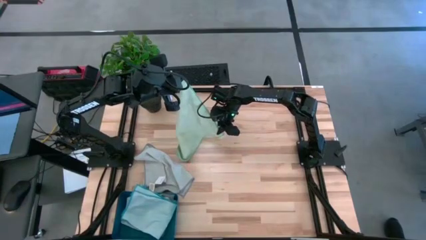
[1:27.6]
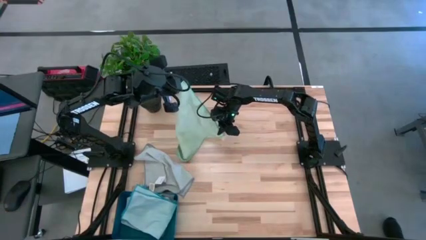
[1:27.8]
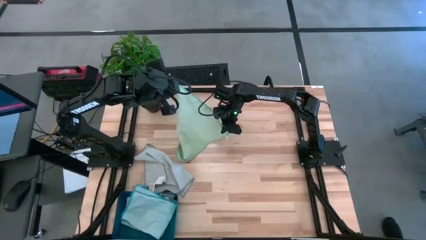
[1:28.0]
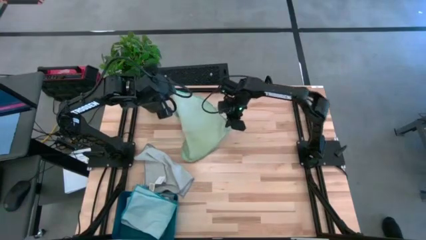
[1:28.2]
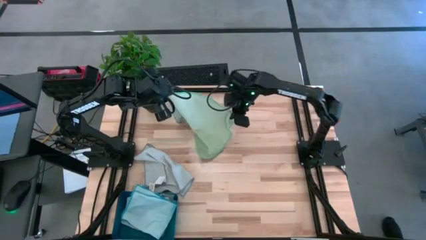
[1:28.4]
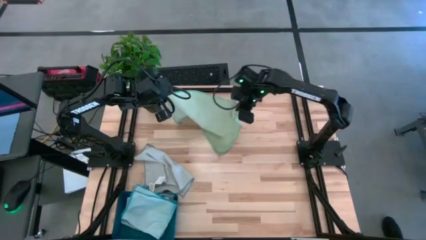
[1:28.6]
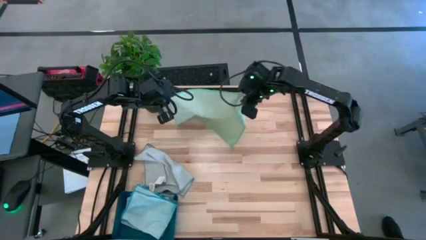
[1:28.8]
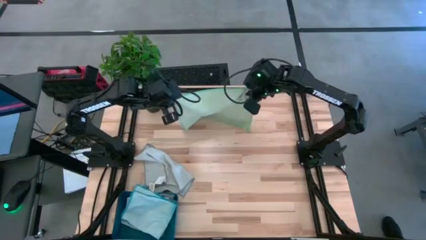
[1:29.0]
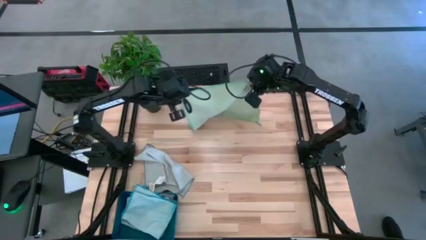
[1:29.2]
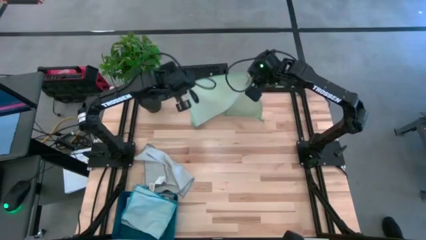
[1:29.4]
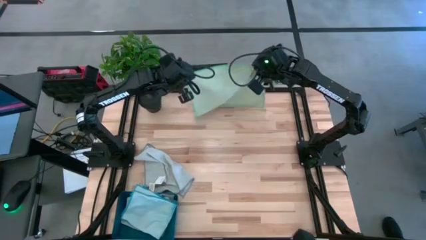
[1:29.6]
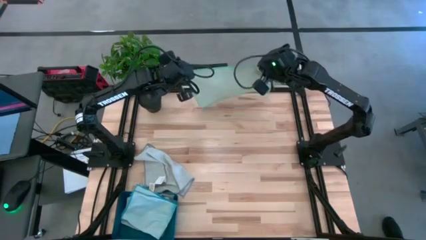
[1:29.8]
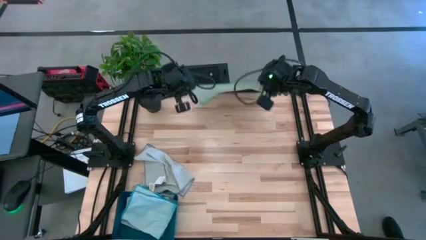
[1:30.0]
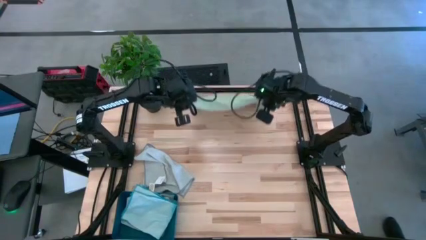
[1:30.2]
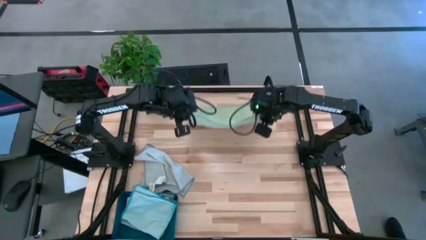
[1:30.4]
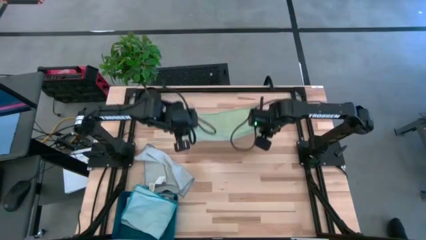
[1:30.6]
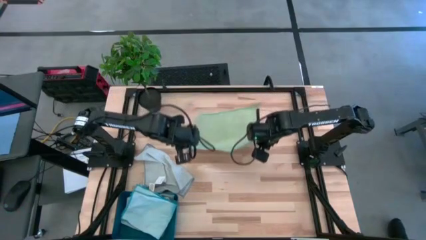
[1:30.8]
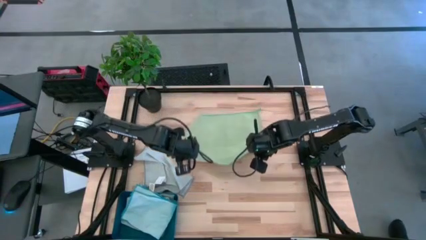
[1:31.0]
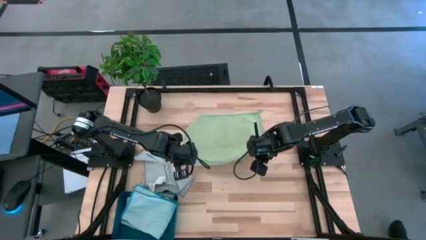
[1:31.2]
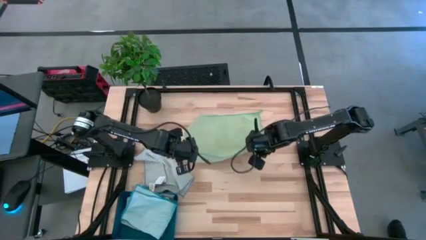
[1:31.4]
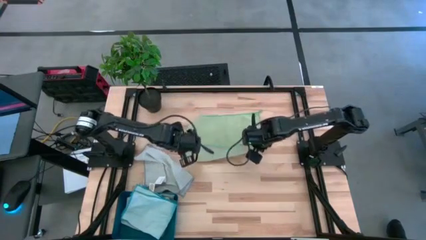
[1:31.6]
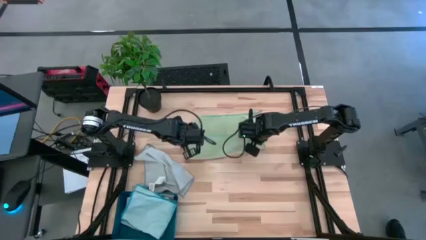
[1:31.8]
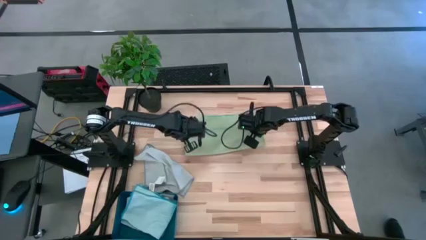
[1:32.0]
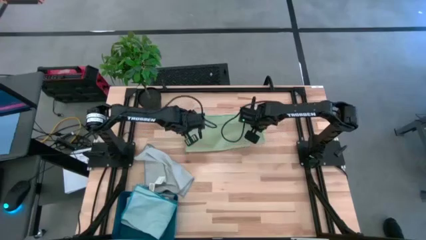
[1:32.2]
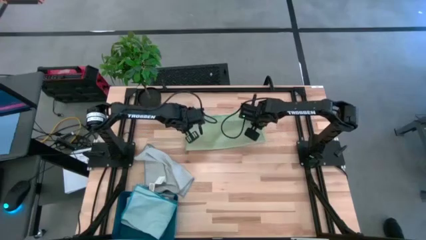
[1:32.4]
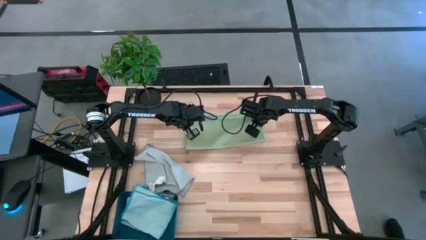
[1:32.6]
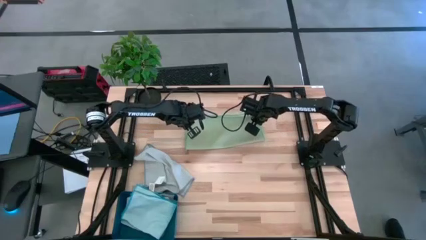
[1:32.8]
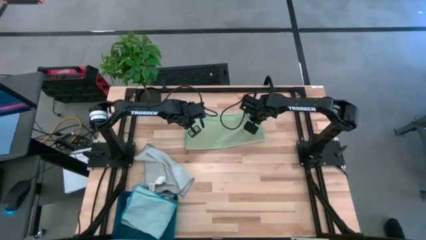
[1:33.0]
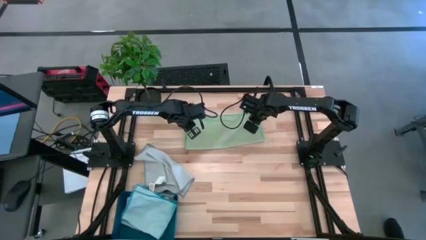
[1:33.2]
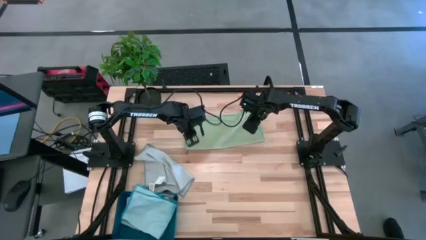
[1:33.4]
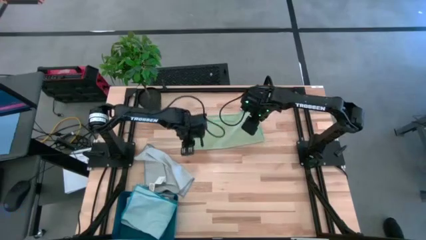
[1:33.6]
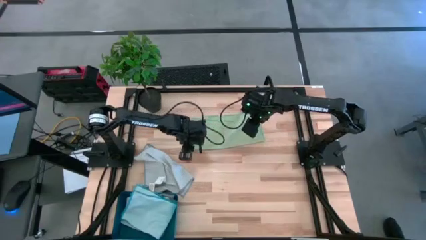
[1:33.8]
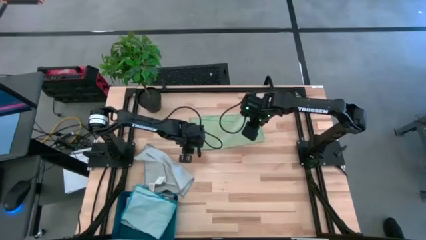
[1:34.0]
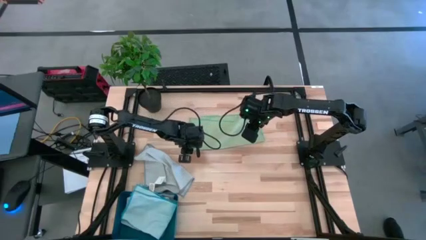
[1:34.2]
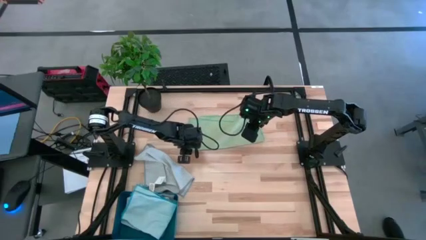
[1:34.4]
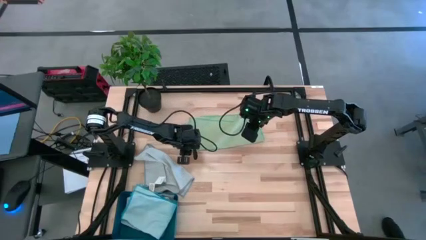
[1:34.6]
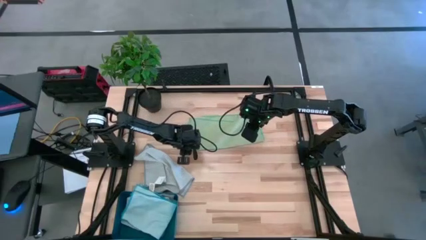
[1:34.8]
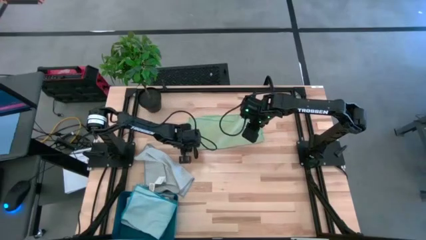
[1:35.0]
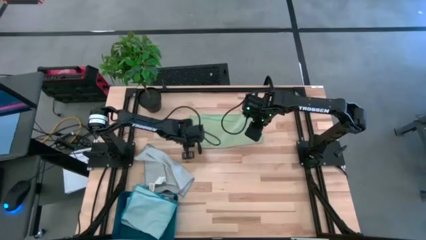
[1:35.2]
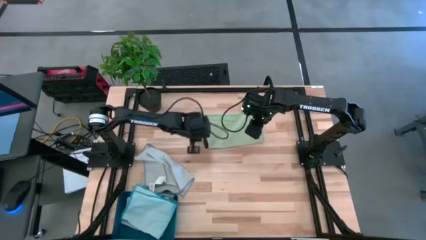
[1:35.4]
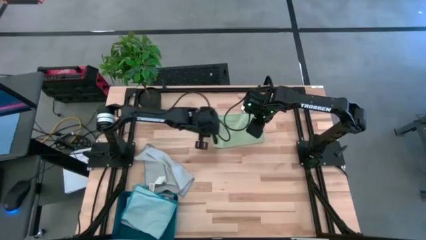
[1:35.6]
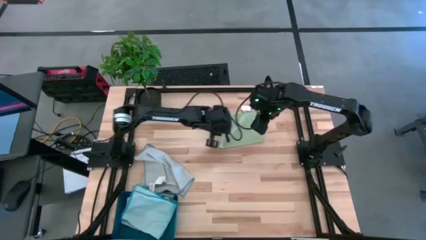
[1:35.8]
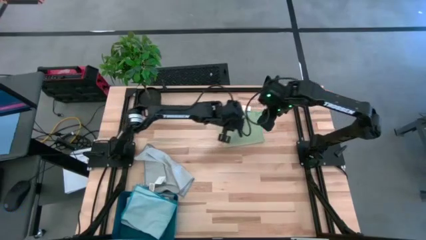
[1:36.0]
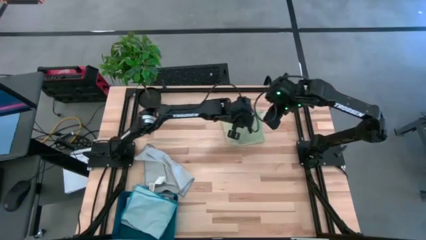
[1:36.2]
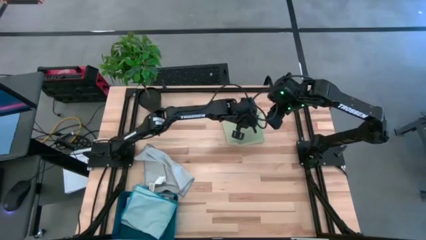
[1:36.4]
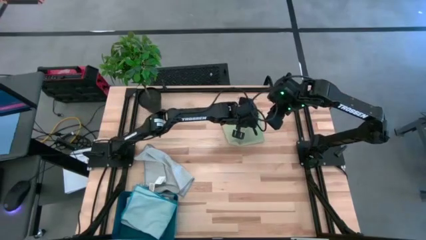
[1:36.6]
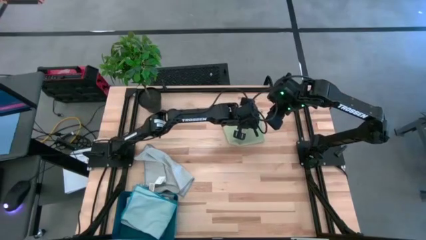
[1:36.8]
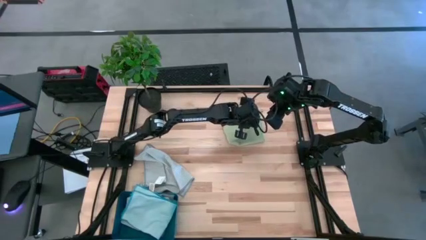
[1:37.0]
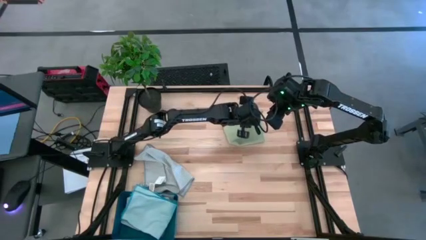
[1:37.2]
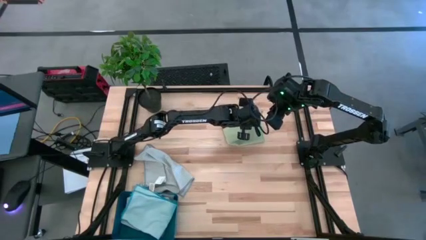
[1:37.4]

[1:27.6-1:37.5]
Task: Fold microfiber towels
Fold the green microfiber towel

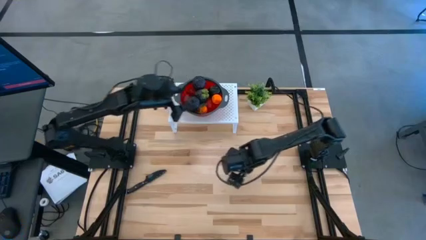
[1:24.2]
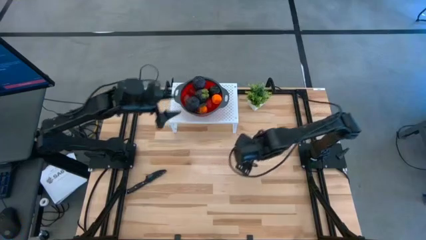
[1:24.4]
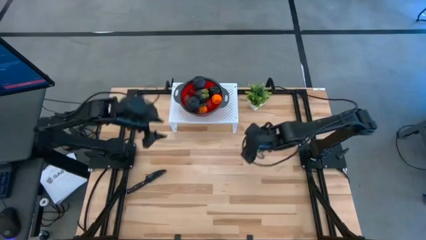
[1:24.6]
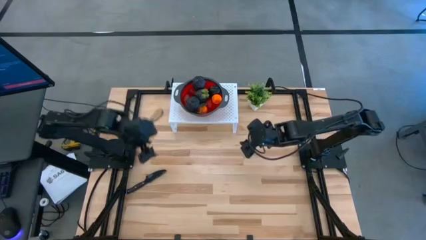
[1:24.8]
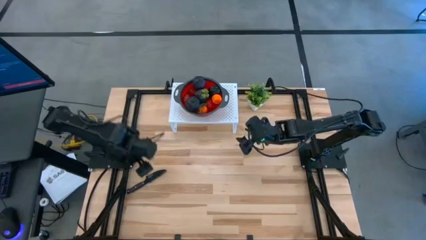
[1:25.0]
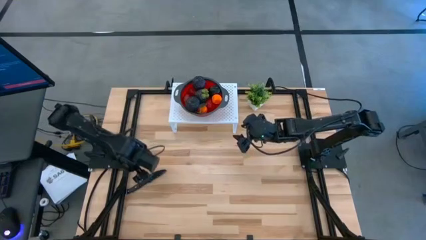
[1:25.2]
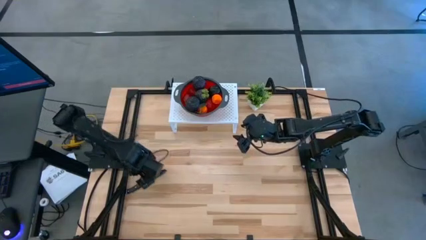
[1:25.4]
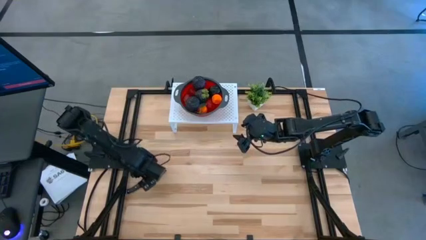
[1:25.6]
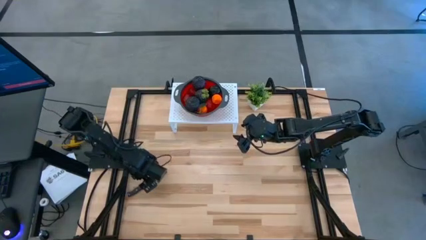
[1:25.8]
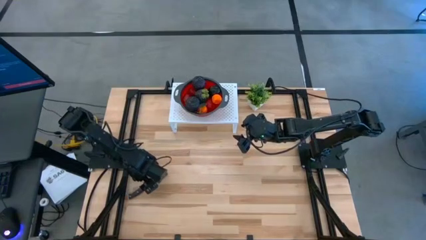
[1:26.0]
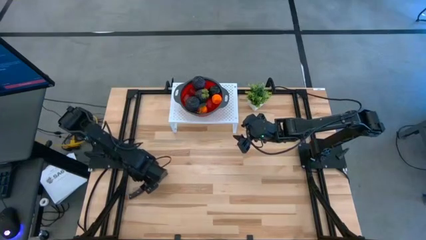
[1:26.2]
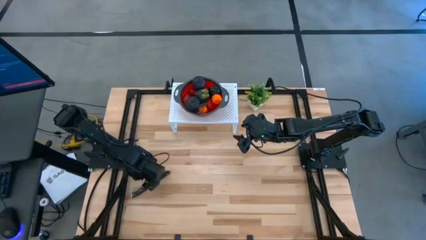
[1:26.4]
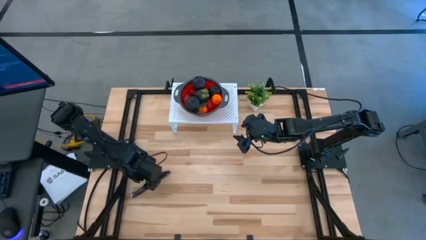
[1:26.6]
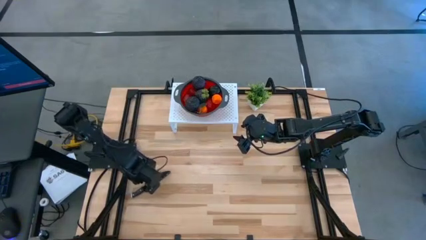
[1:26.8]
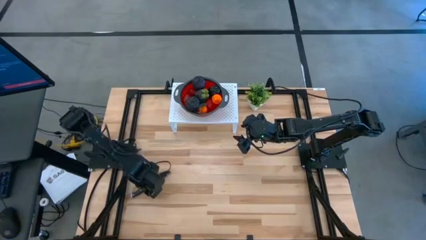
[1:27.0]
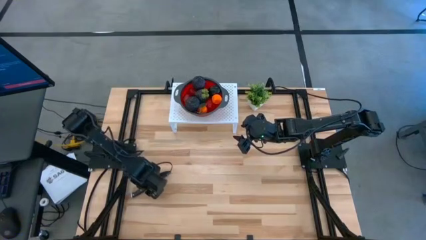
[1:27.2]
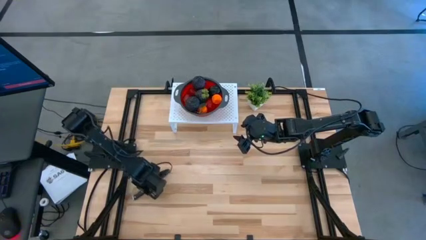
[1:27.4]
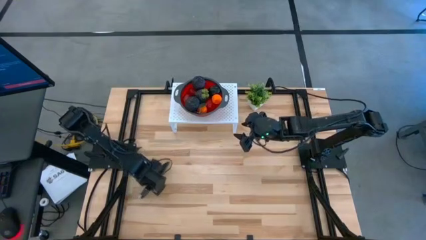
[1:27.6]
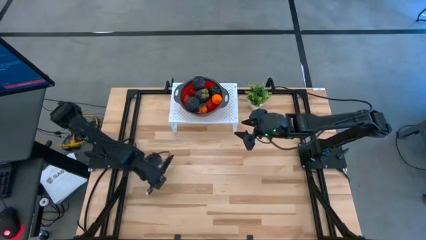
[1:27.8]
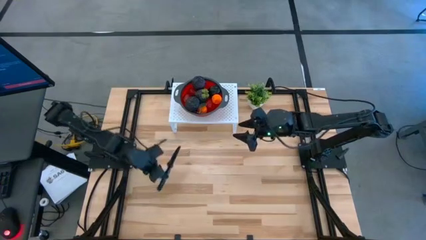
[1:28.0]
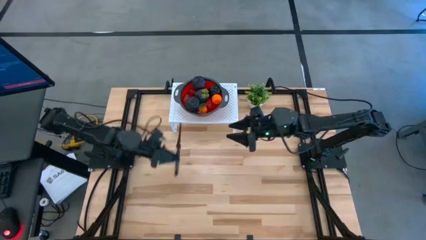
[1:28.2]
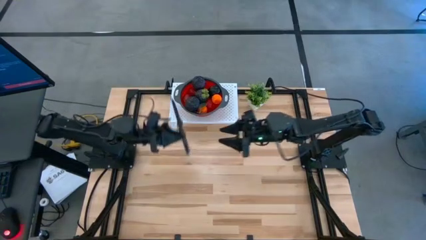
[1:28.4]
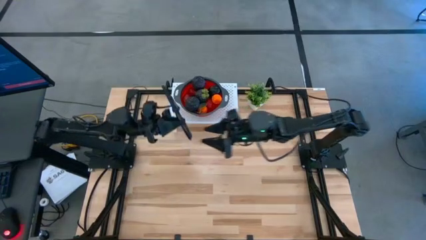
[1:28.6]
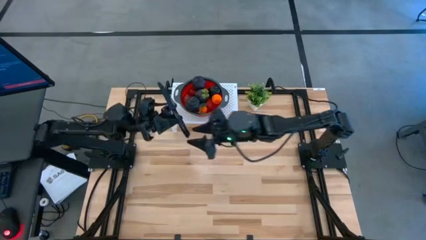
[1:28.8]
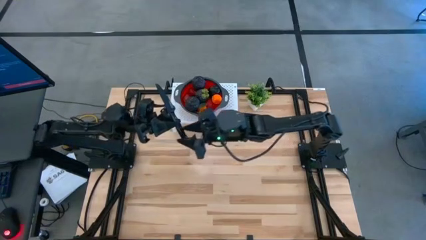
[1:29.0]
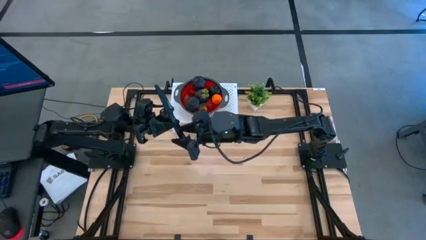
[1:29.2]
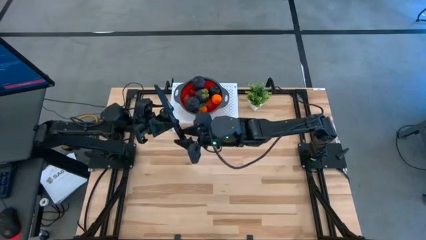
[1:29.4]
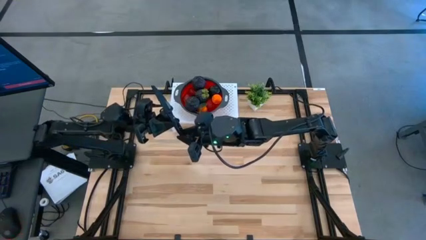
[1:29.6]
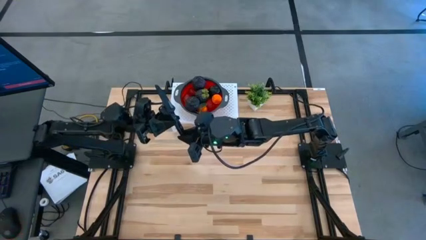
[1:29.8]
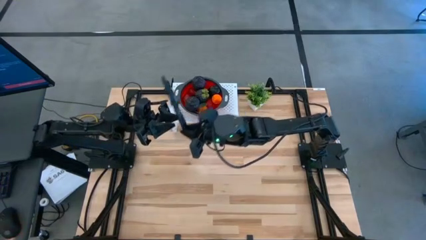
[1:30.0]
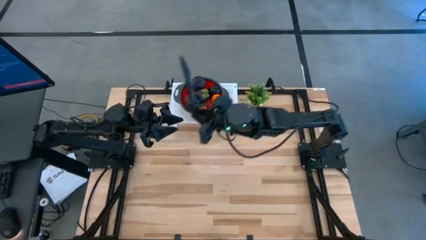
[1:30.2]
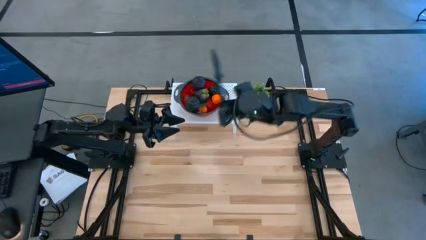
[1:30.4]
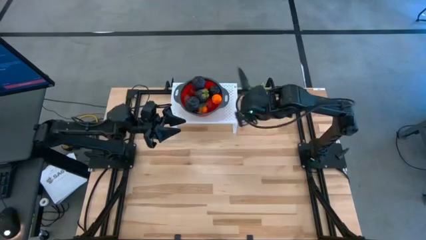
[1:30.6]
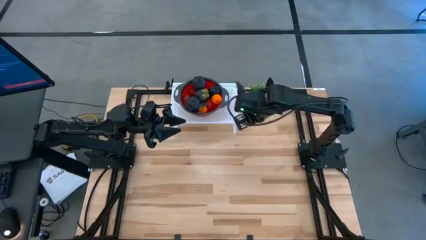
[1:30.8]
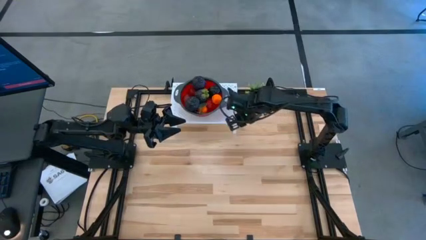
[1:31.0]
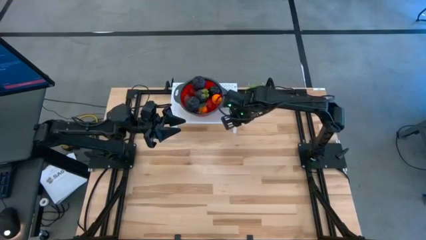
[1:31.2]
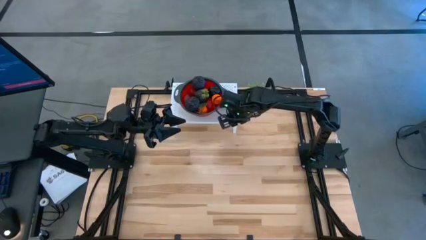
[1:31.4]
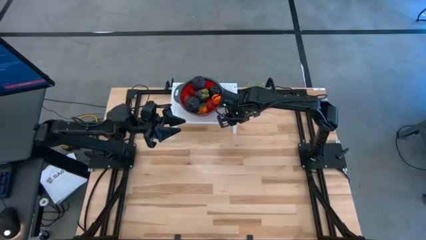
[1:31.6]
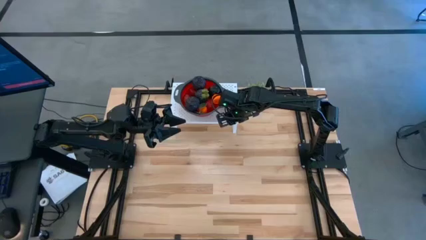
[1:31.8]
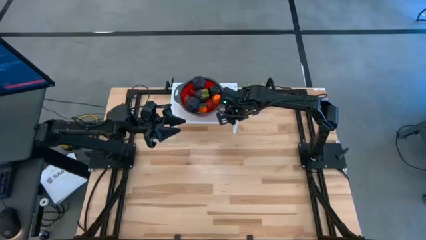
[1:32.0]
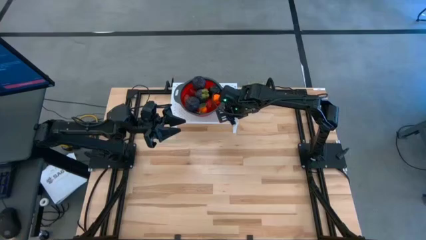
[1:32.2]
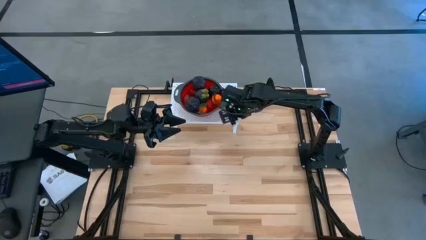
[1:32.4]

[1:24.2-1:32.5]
Task: Pick & Place Fruit
Put the black knife on the shelf
